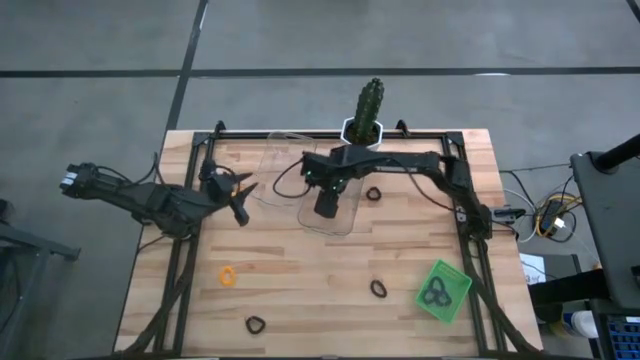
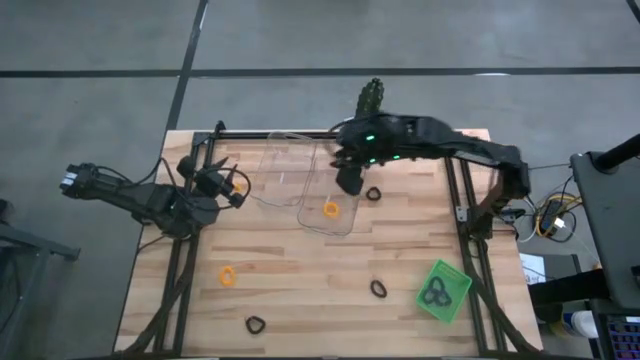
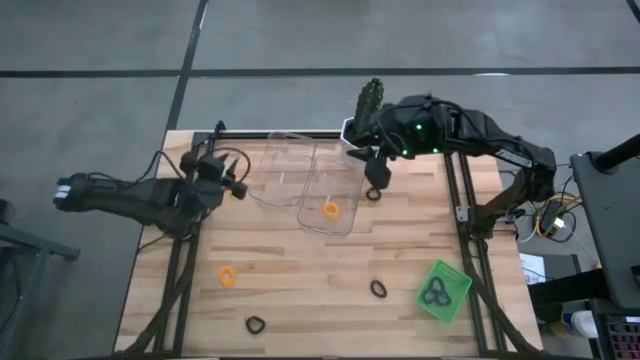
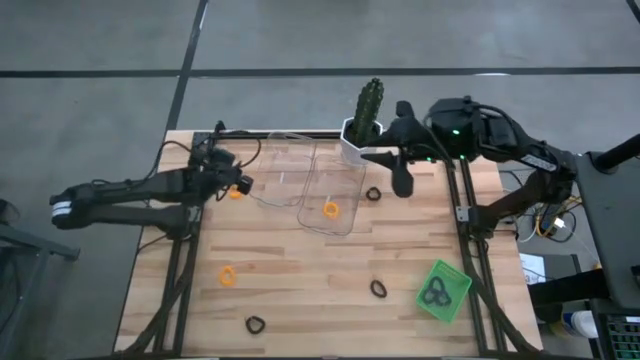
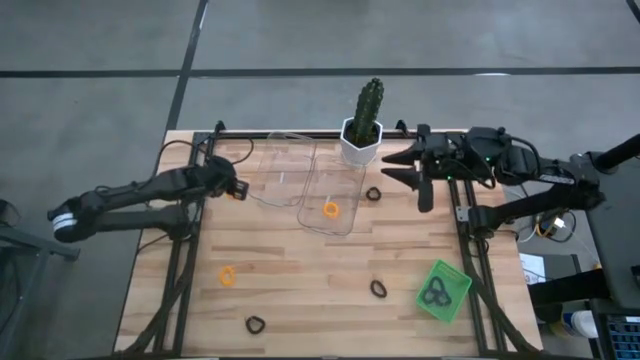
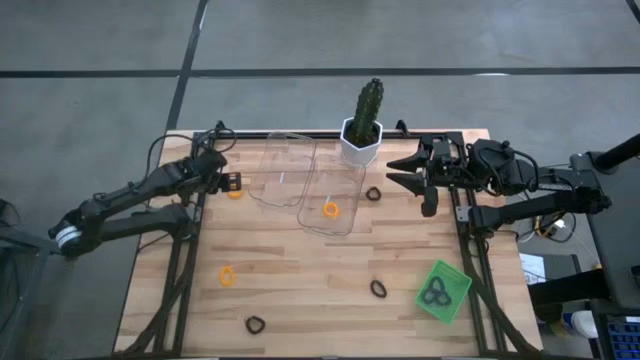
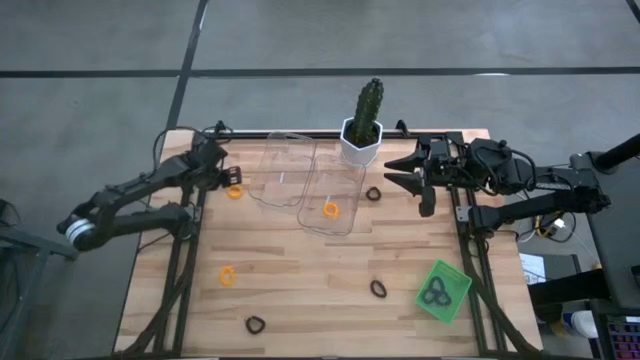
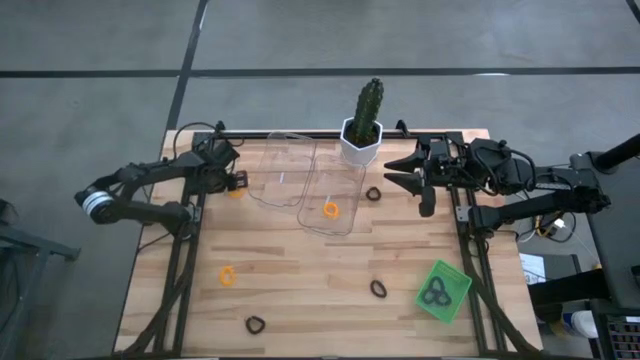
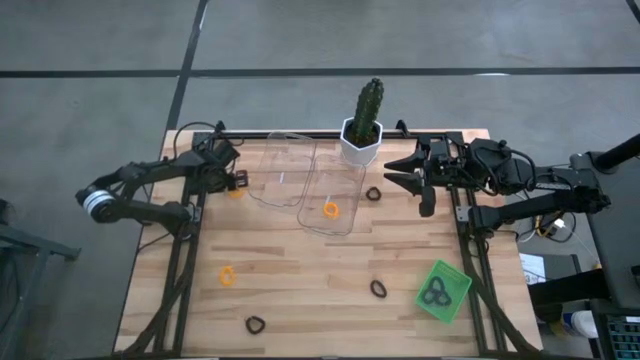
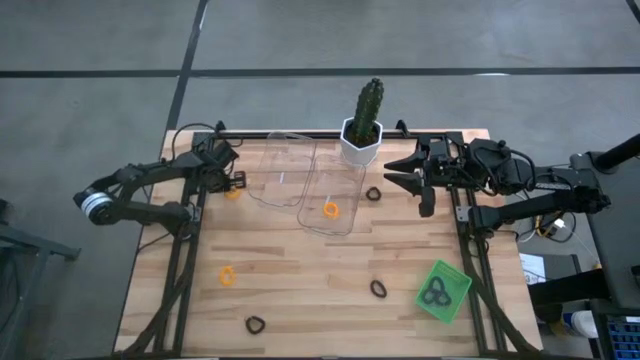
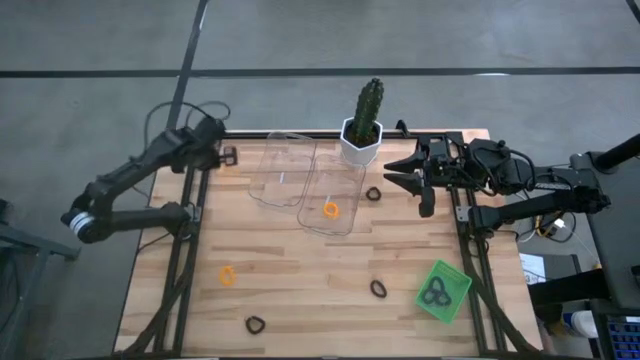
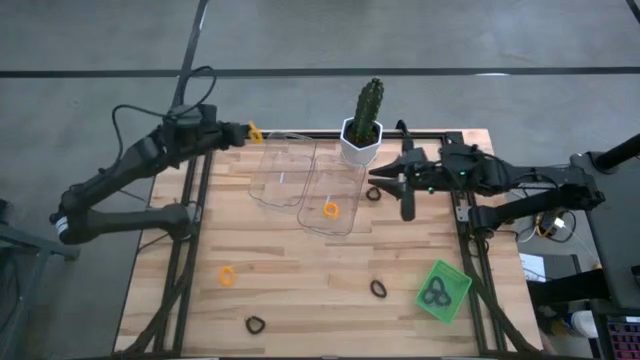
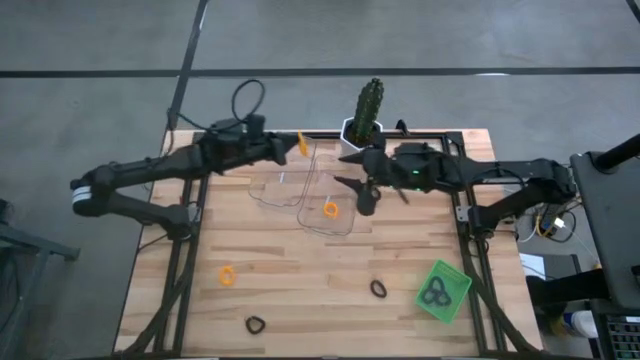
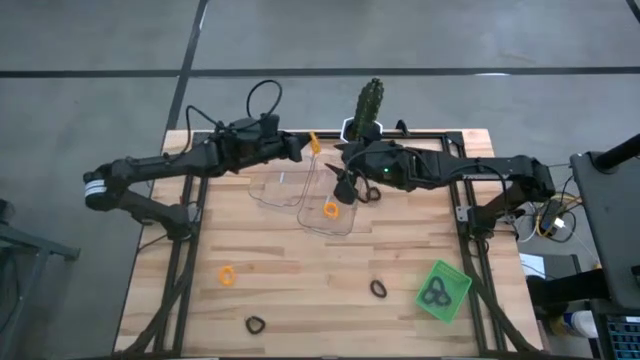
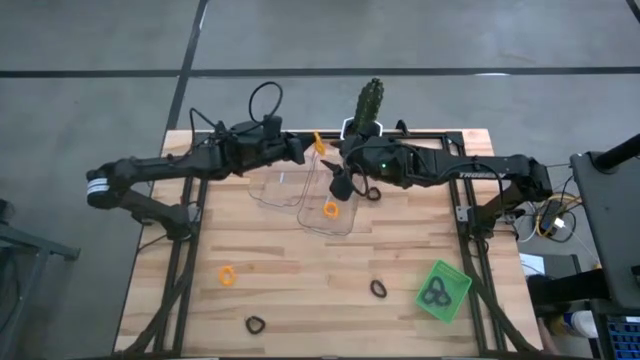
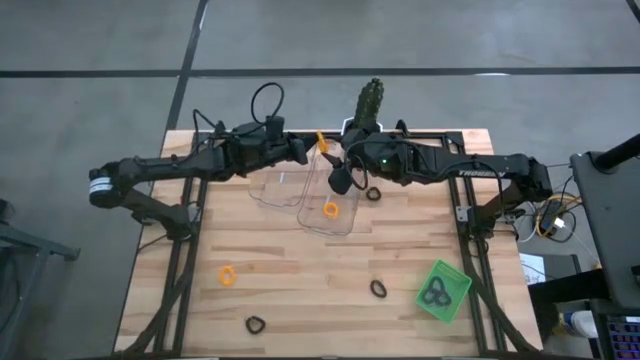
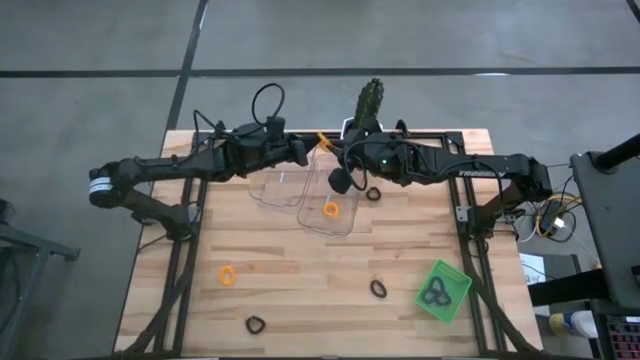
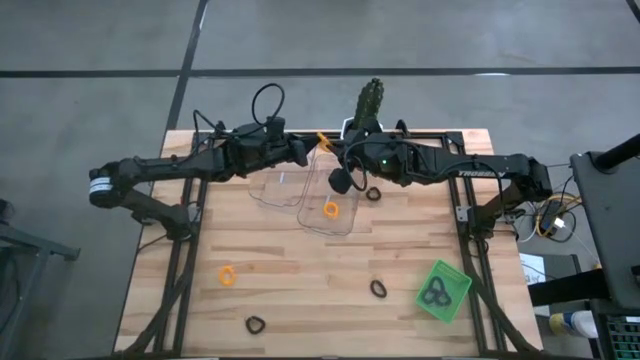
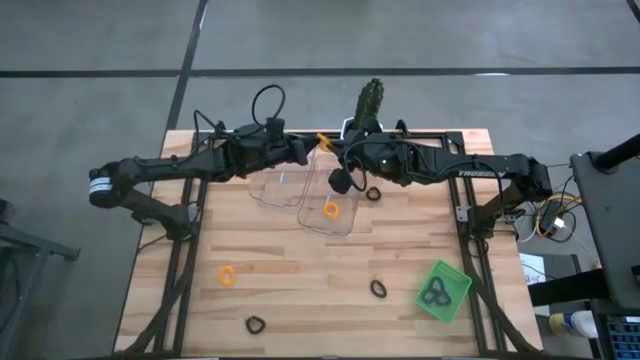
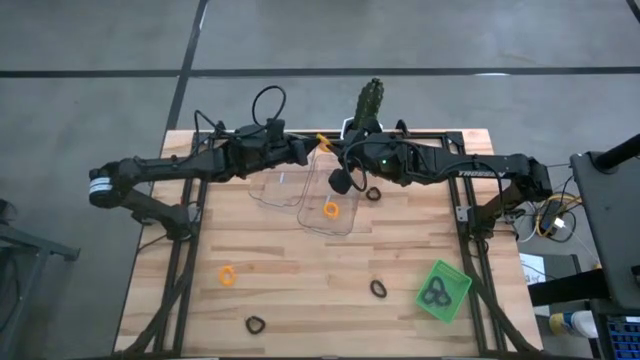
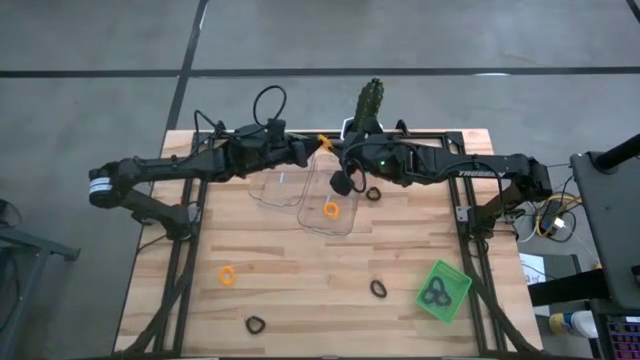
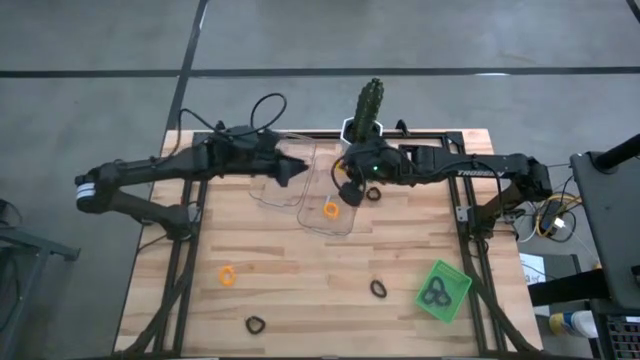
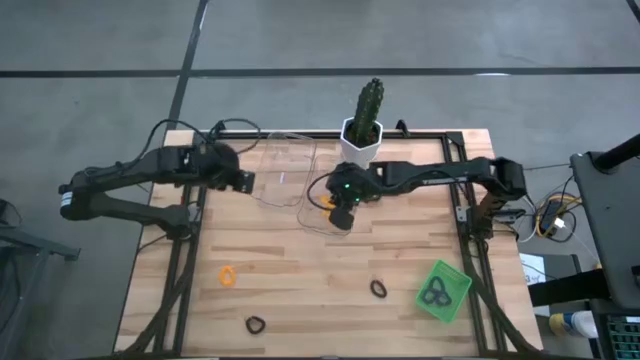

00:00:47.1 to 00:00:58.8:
Task: Sort items
Put the top yellow keychain into the right transparent bin

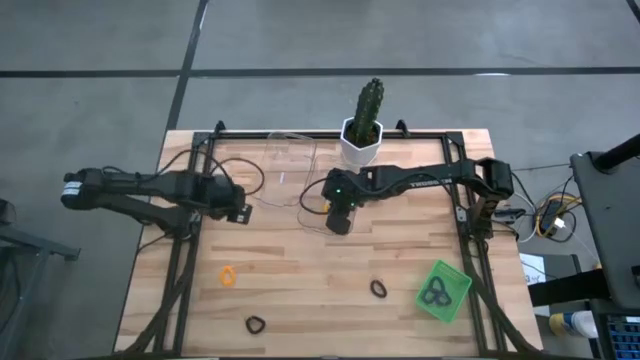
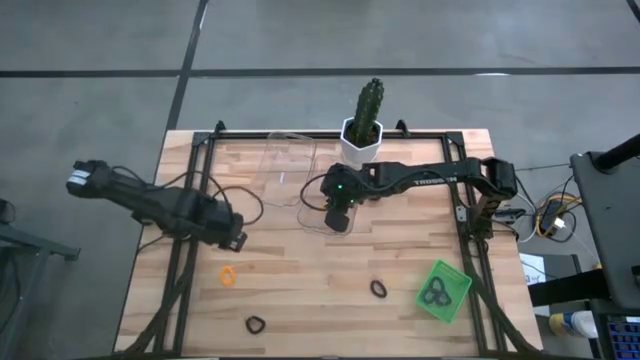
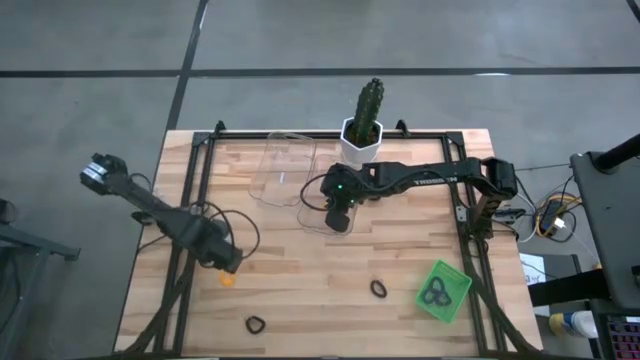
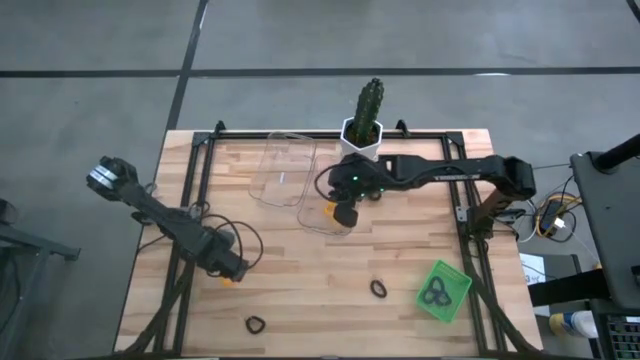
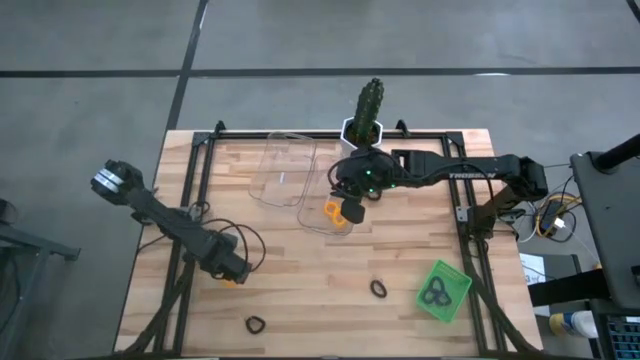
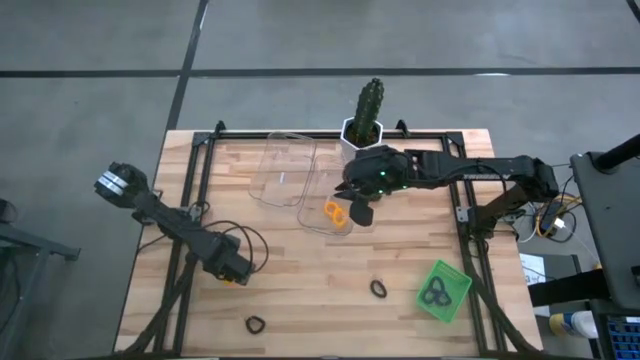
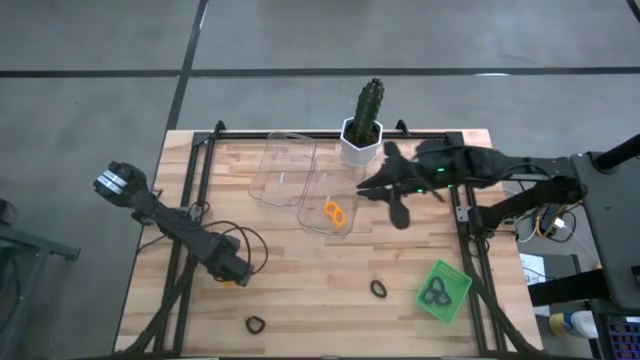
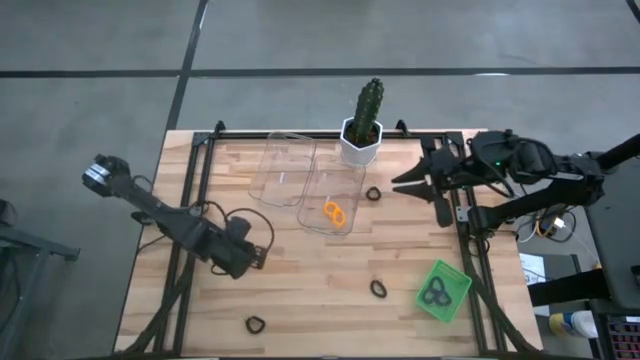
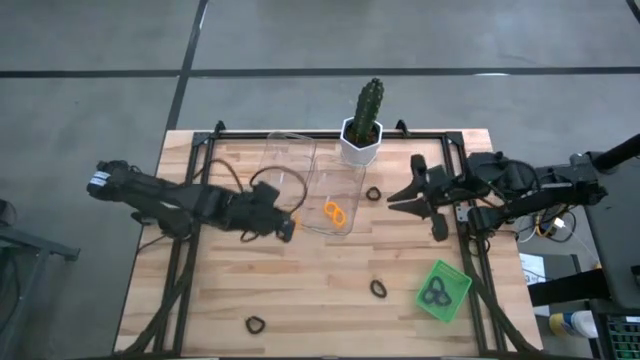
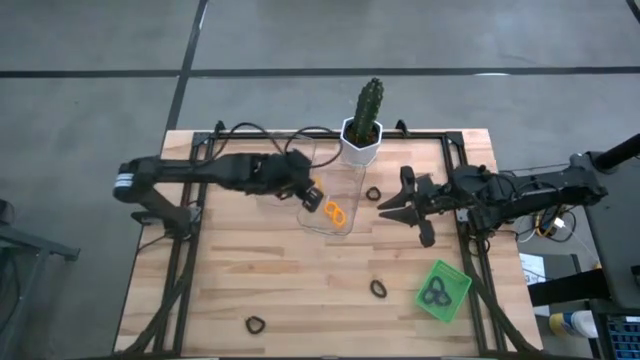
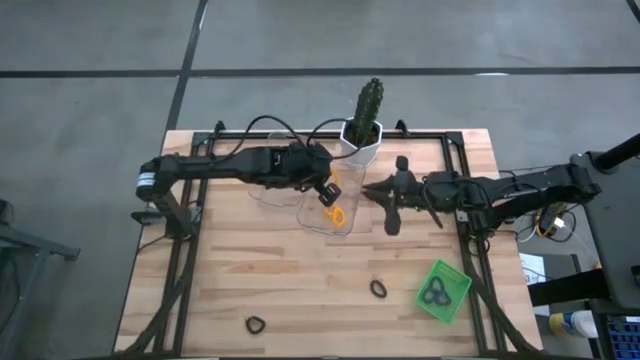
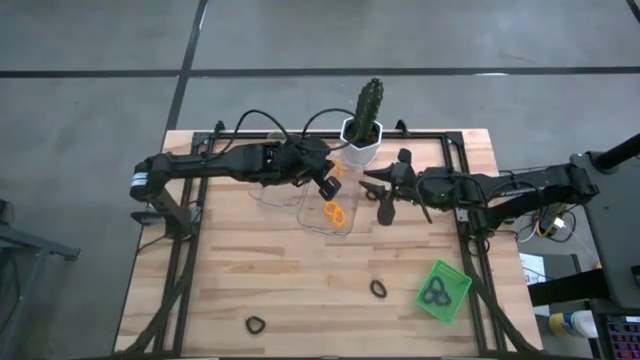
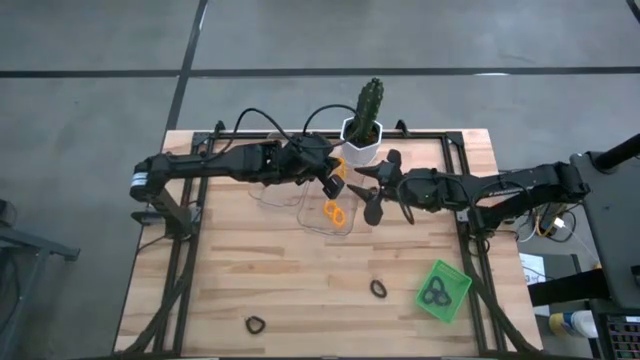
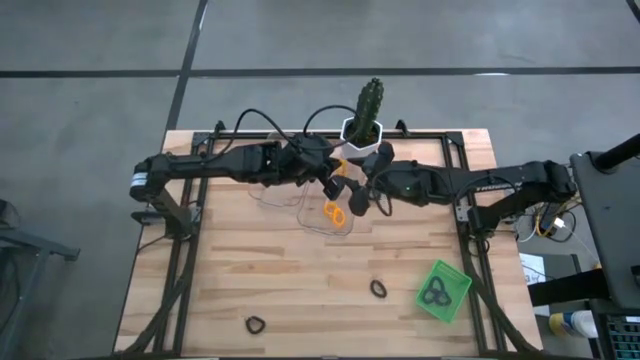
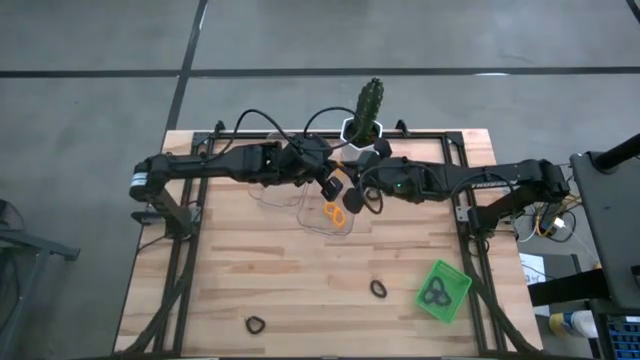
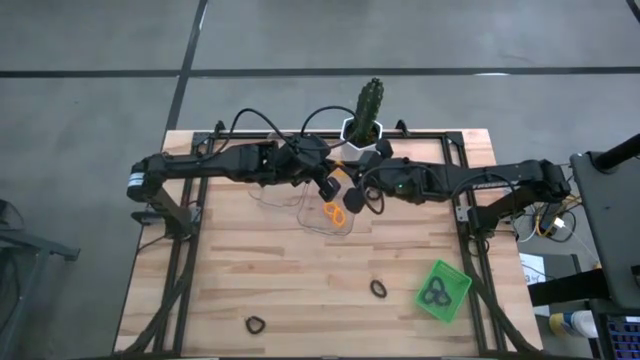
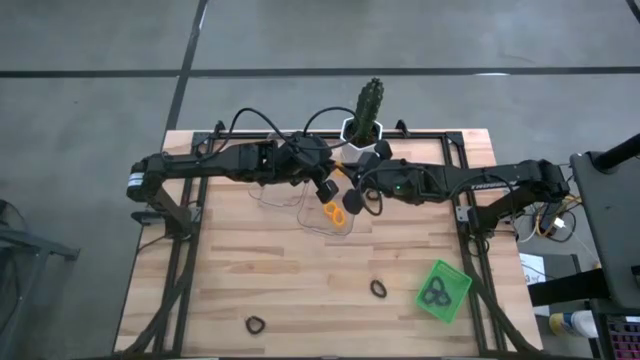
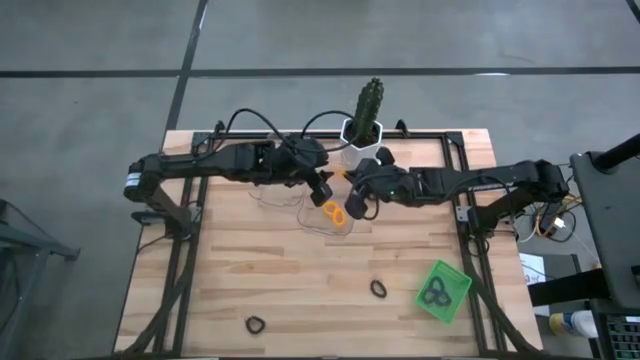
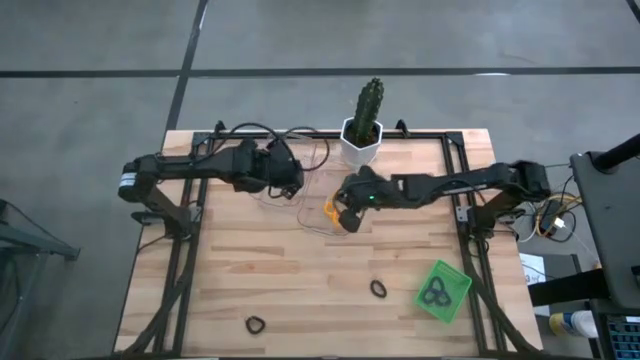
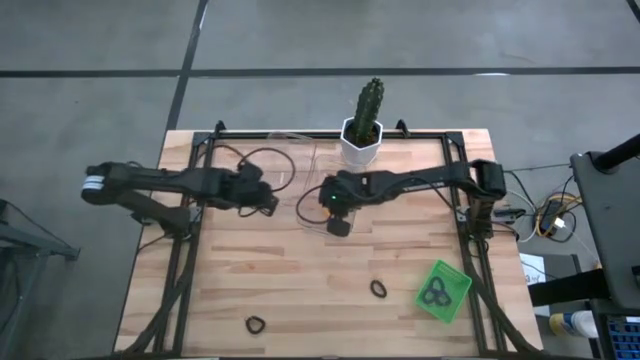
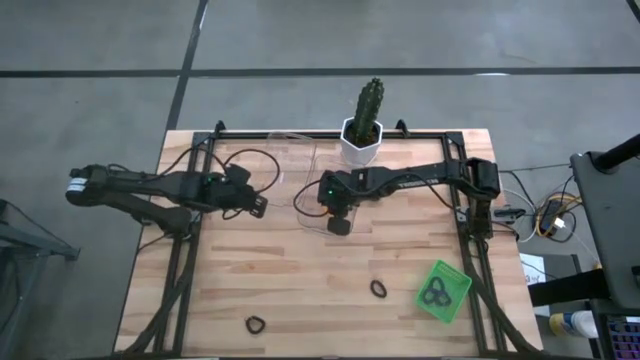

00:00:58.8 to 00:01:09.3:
Put the yellow keychain into the right transparent bin
